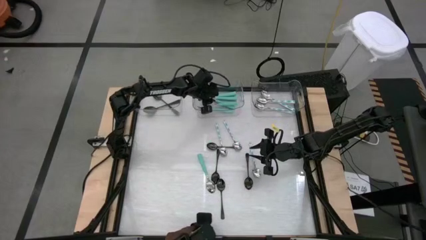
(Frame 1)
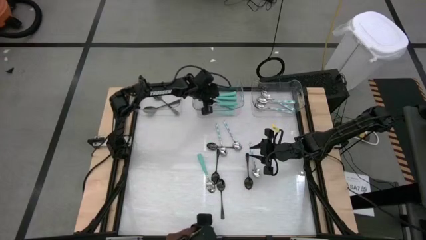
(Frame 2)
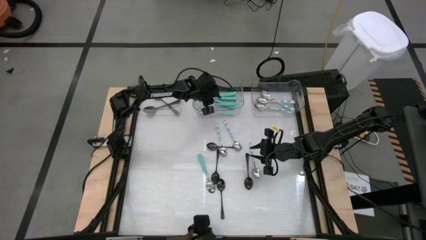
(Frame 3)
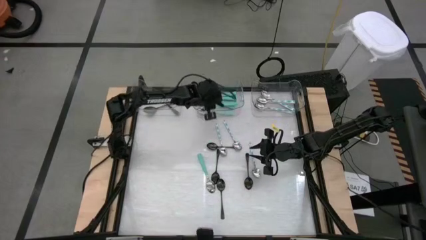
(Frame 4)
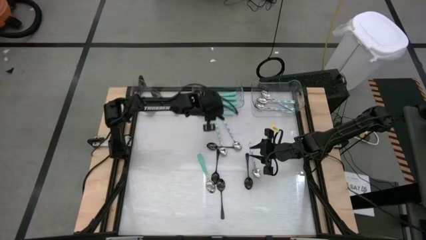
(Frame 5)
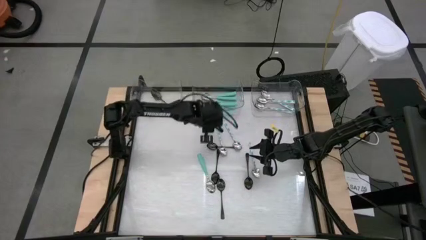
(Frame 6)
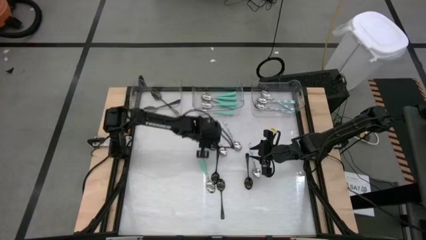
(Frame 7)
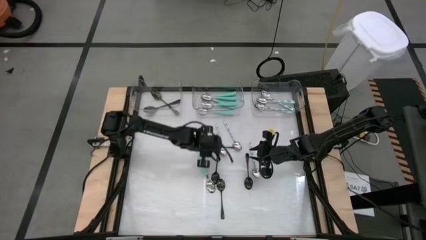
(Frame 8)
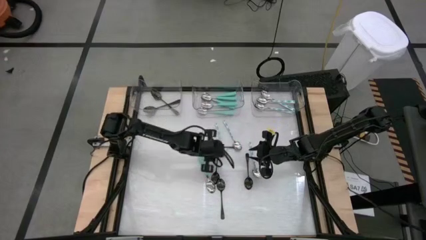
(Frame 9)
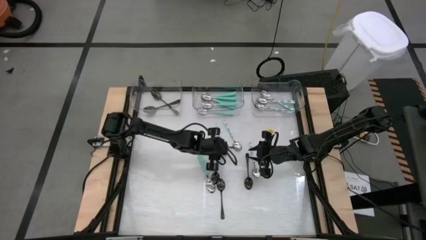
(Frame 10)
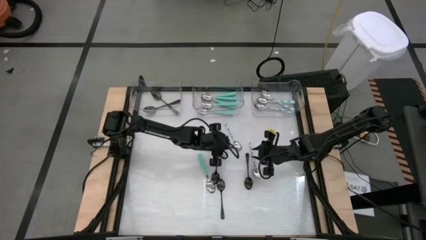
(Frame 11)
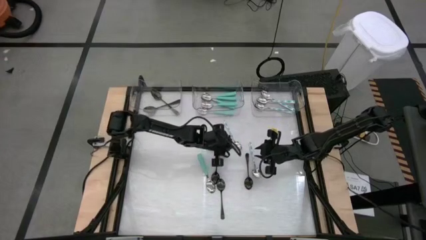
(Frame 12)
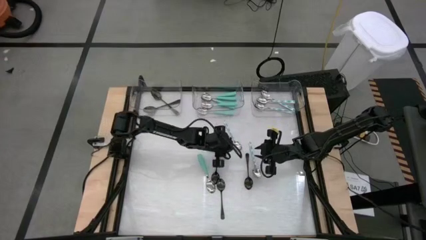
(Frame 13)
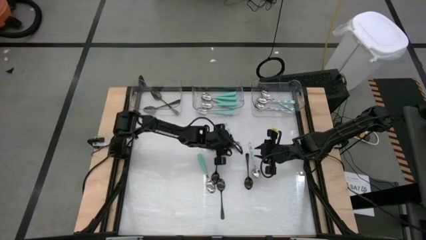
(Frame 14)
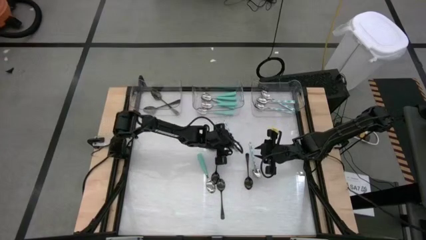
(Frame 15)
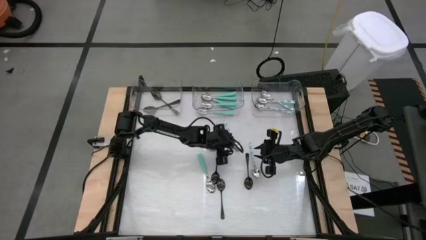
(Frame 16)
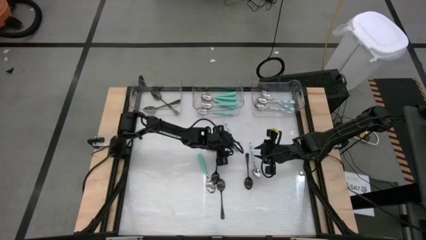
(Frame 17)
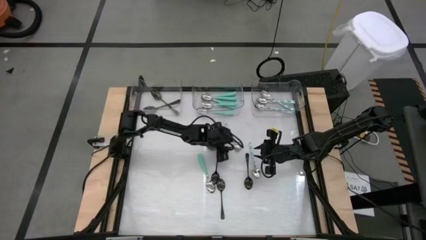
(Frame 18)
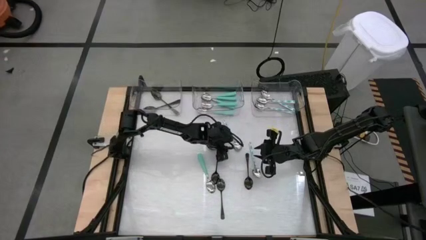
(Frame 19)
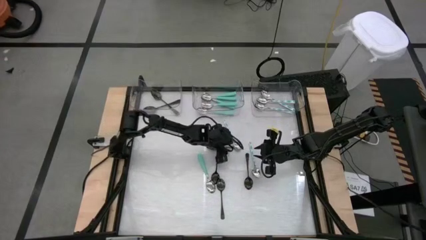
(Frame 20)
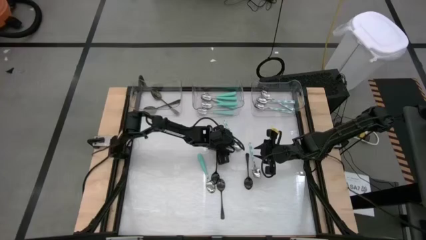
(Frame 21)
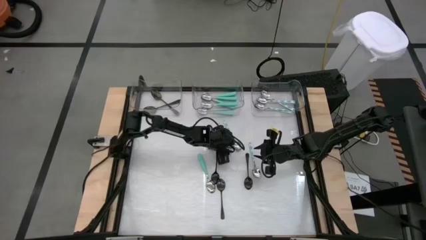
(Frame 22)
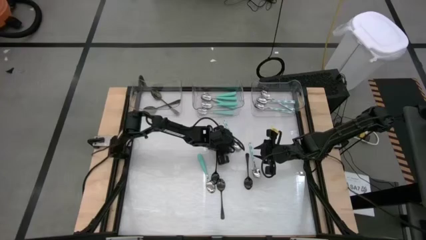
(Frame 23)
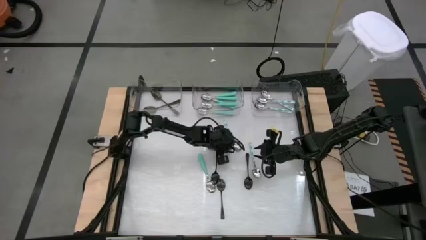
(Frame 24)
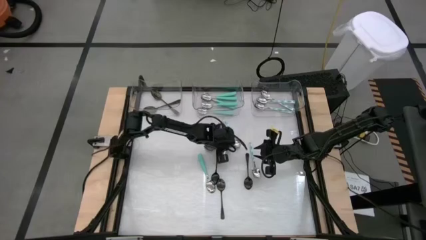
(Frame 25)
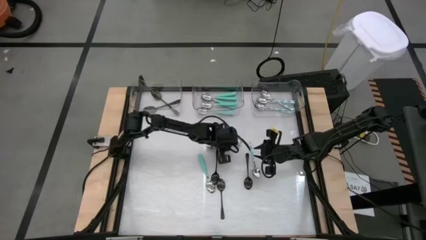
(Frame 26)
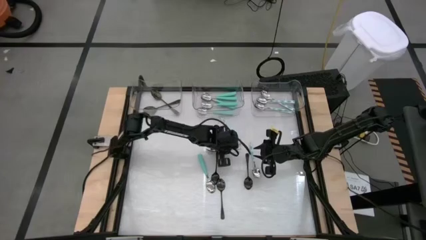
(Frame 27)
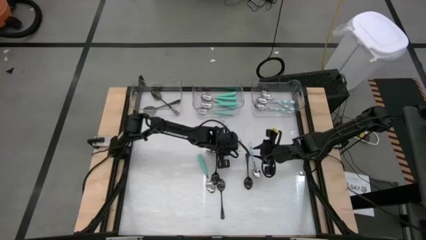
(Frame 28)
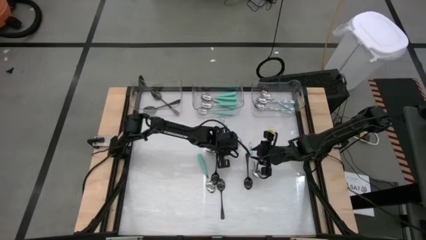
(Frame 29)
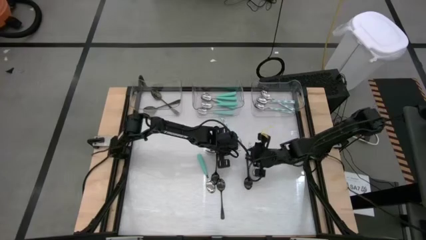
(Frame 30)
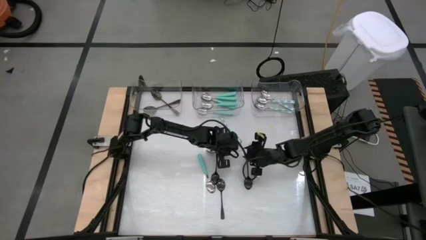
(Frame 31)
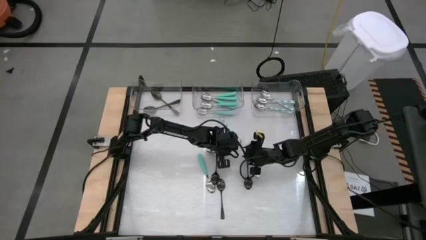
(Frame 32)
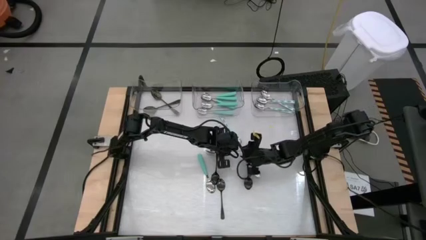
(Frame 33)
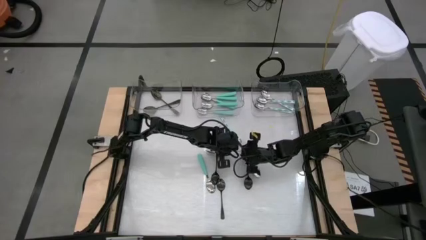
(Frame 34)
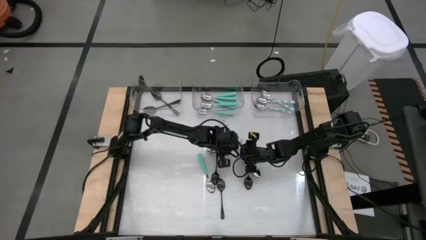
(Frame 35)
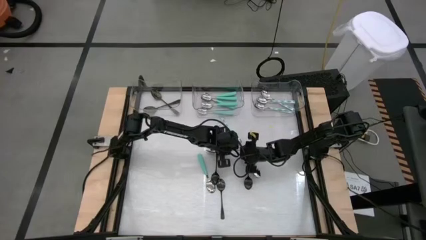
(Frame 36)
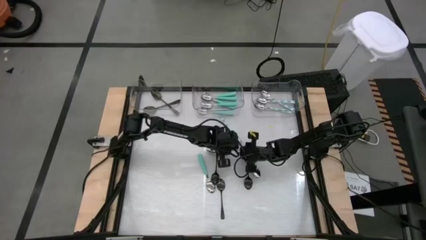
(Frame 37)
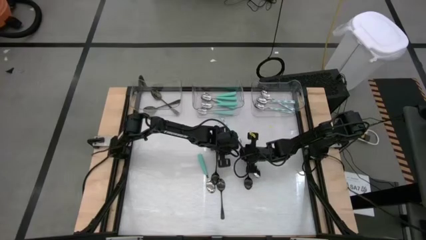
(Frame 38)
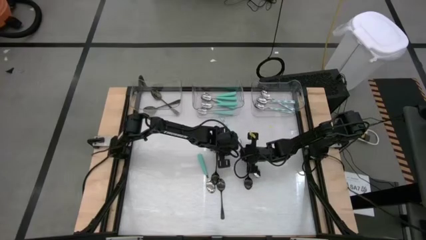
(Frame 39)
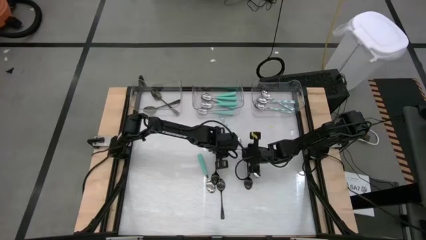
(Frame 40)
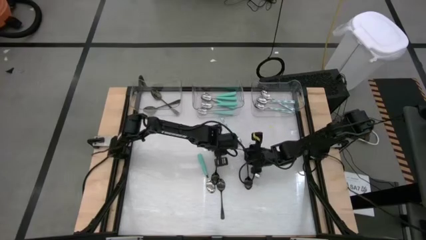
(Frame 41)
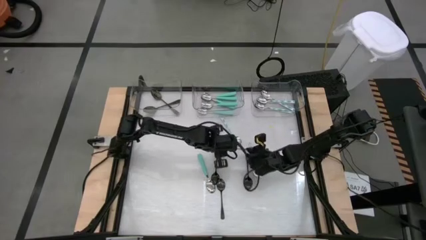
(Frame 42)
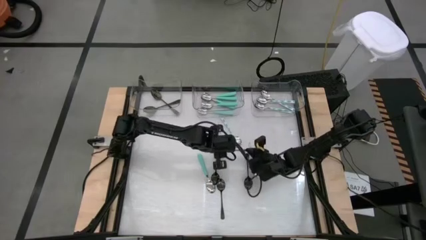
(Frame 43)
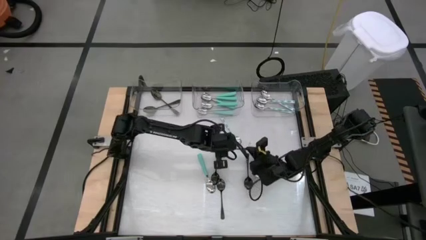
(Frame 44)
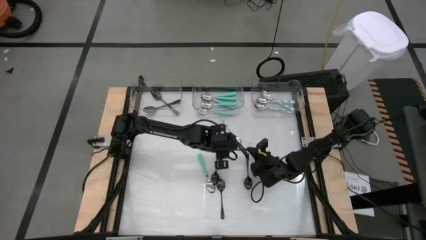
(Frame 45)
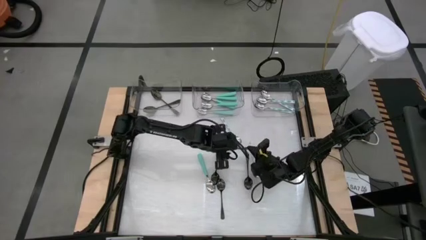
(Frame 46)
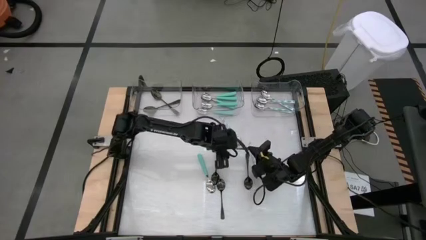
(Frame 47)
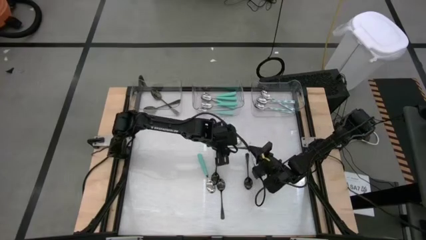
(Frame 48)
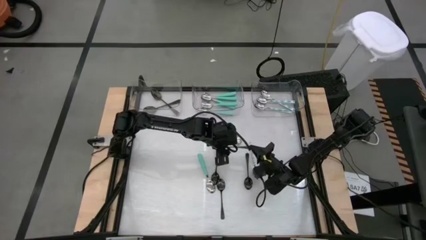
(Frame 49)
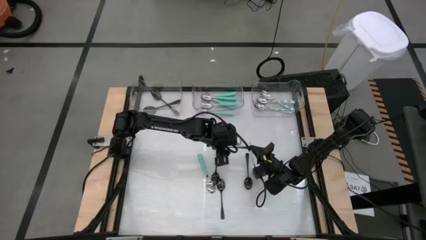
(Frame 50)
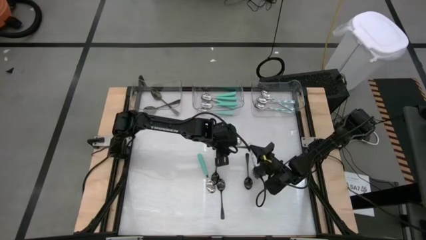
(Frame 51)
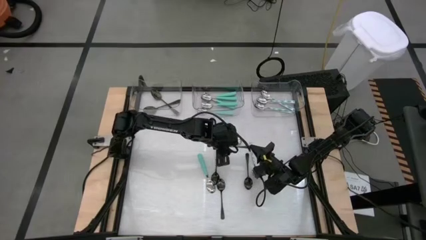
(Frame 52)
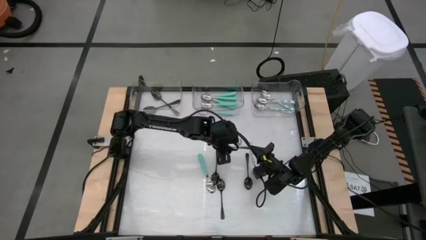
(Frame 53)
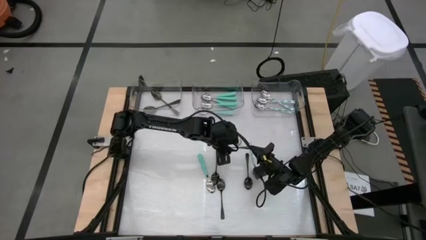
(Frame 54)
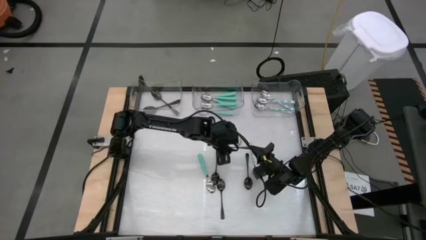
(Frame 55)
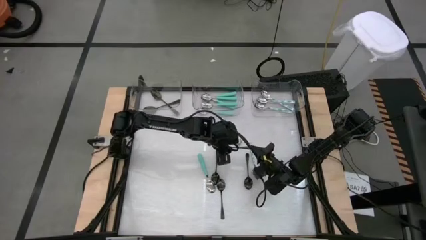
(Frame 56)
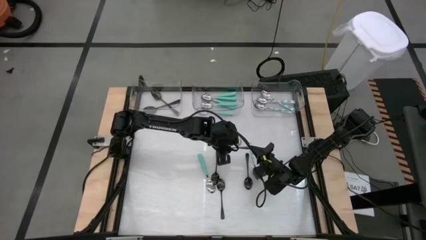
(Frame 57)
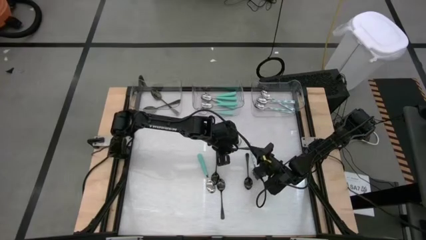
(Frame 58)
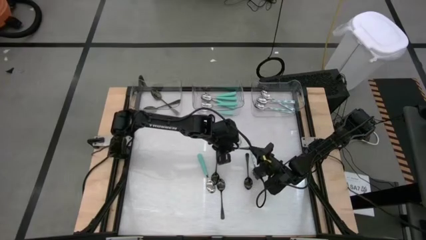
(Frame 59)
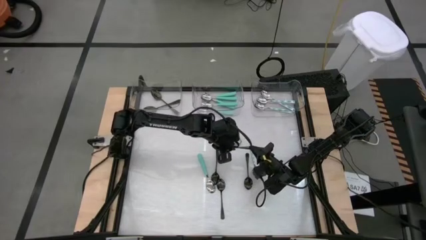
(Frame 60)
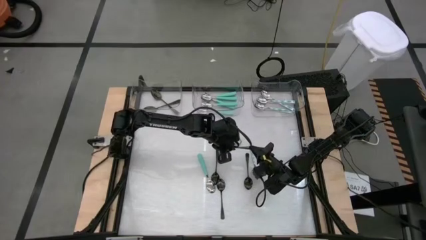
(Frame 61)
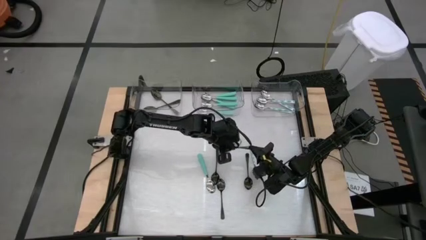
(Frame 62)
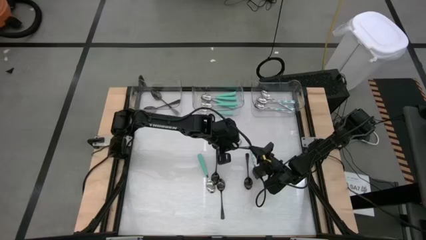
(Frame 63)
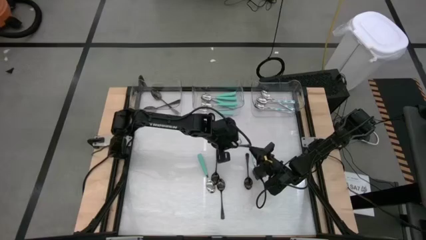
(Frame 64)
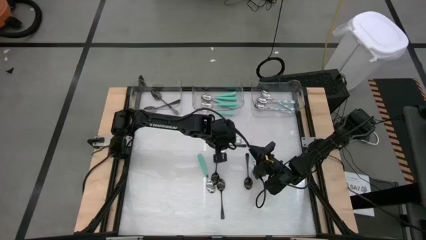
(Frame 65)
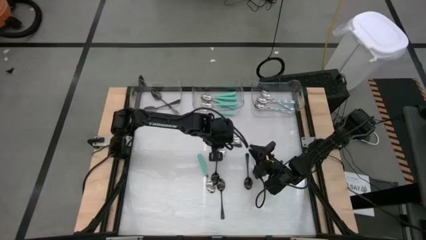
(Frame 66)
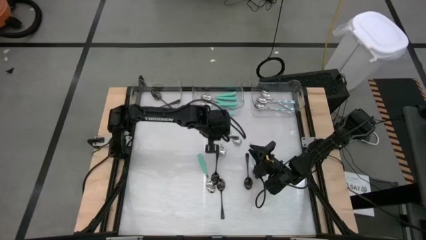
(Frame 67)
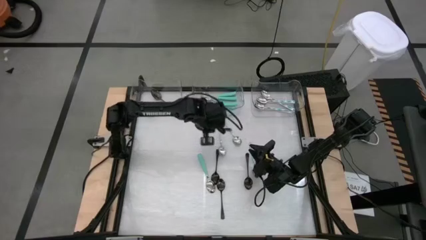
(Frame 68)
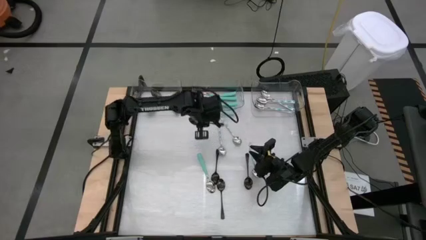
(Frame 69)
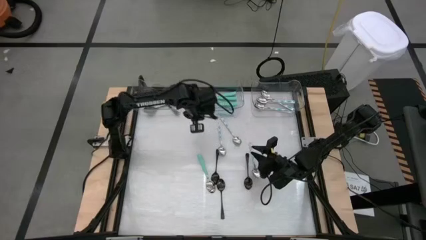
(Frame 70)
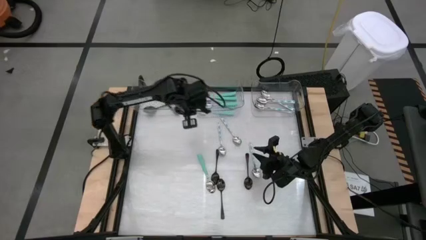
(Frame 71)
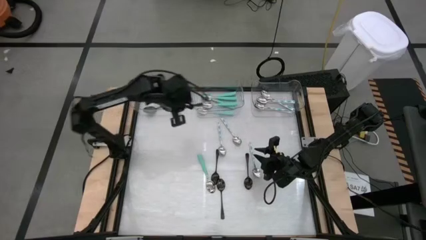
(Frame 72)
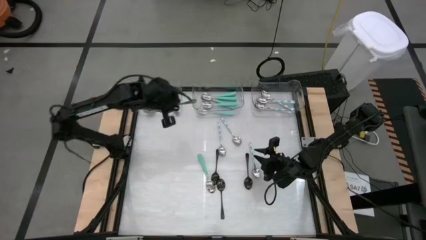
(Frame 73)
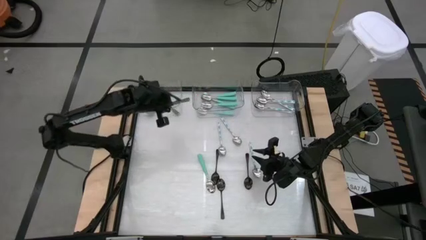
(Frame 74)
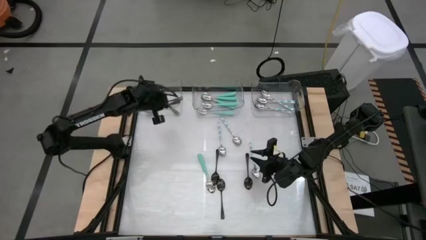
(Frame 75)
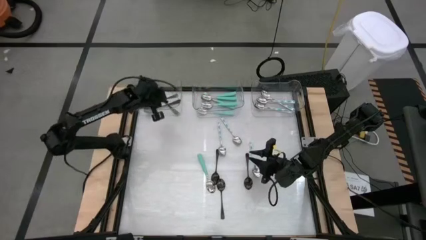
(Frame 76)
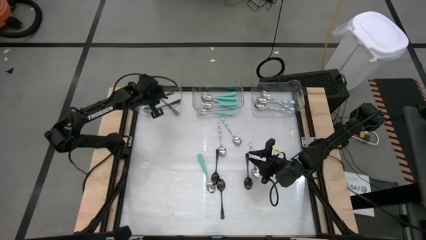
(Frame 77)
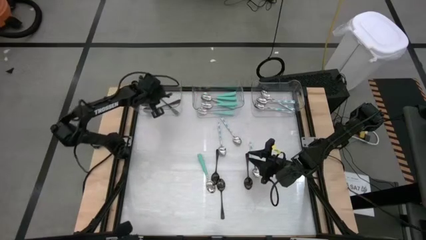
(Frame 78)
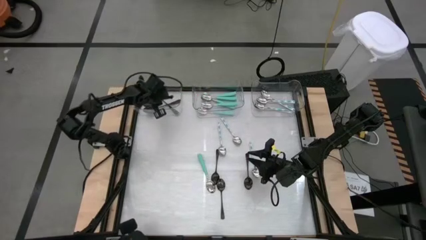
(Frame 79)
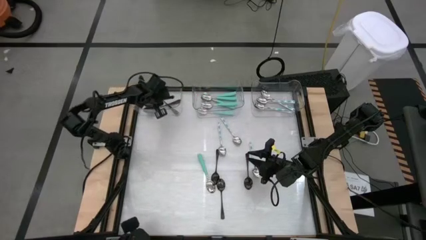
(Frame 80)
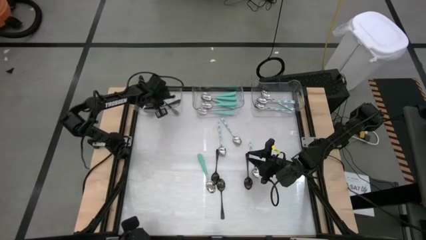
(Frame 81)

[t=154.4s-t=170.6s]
Task: Sort silverware by color (type)
Put the black spoon into the left transparent bin
